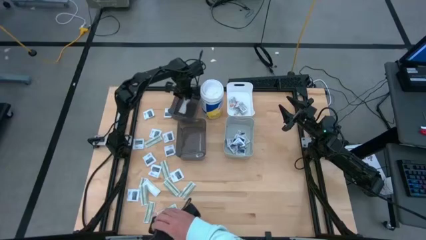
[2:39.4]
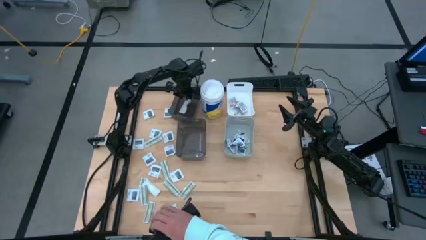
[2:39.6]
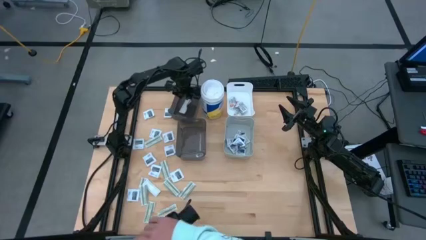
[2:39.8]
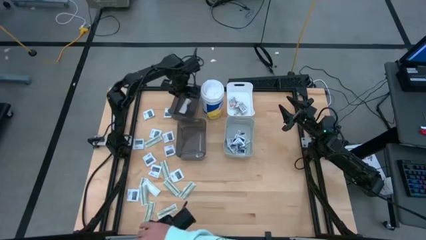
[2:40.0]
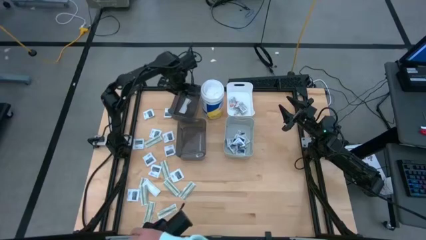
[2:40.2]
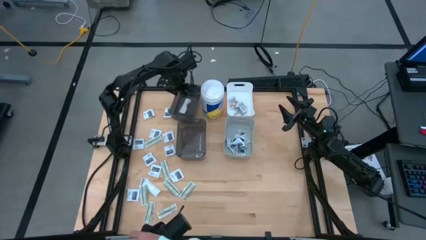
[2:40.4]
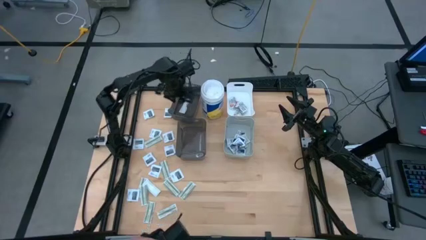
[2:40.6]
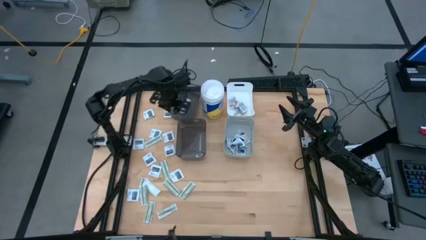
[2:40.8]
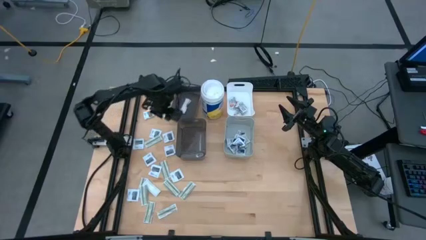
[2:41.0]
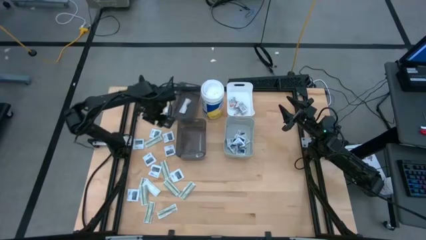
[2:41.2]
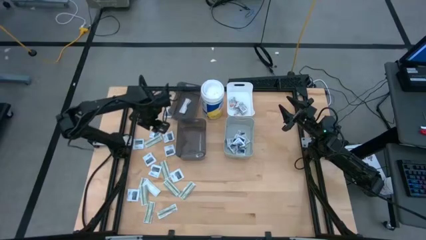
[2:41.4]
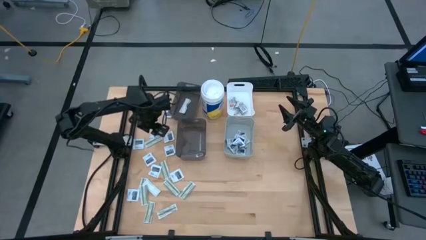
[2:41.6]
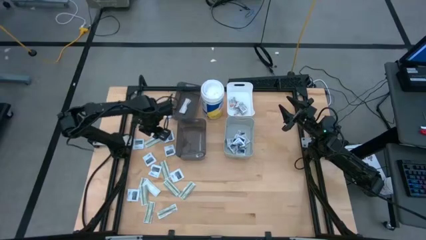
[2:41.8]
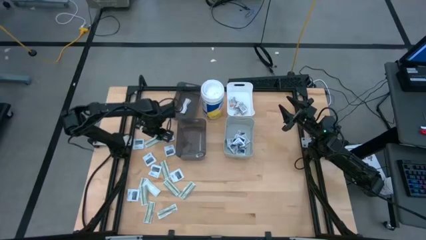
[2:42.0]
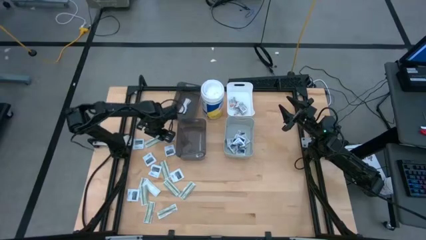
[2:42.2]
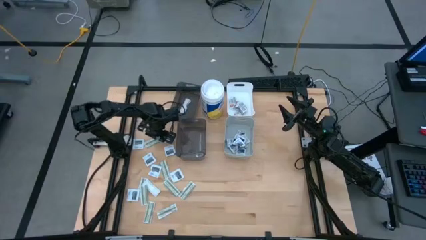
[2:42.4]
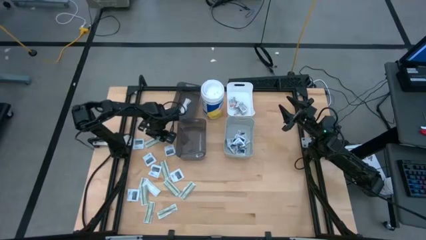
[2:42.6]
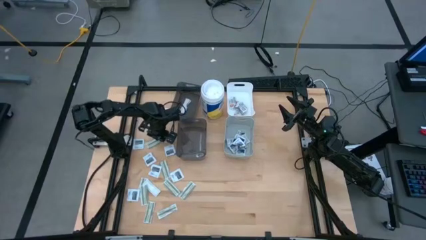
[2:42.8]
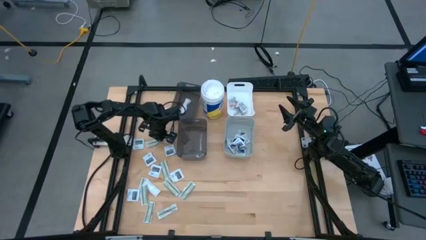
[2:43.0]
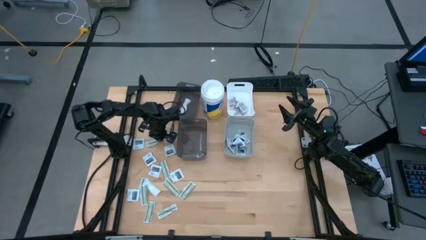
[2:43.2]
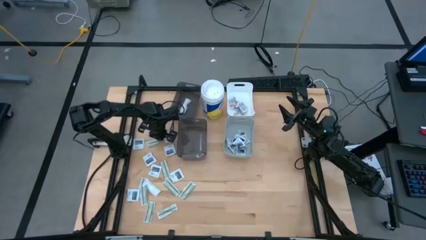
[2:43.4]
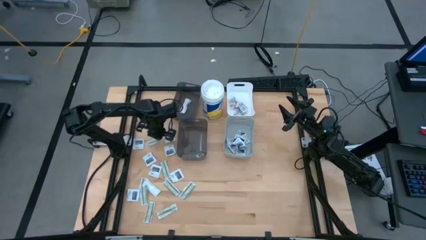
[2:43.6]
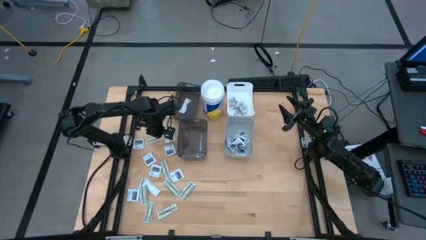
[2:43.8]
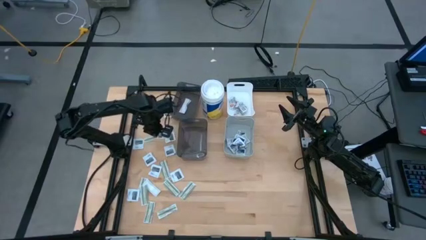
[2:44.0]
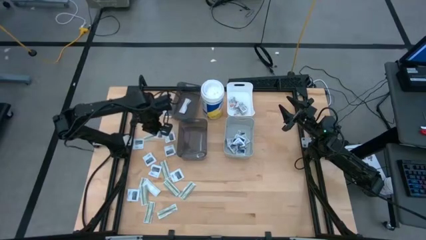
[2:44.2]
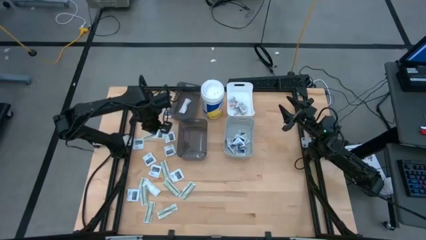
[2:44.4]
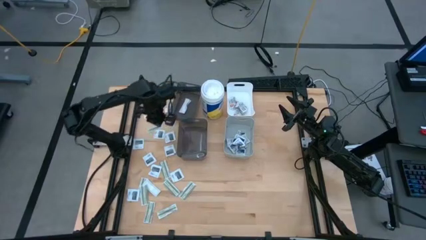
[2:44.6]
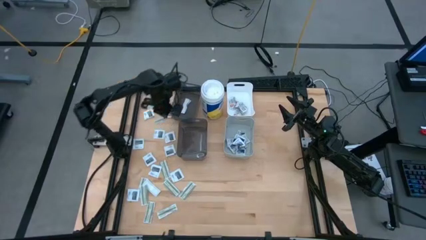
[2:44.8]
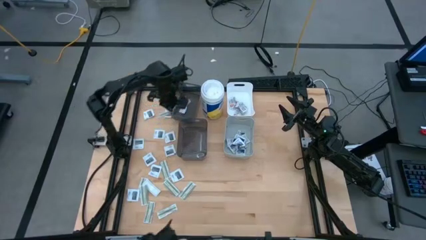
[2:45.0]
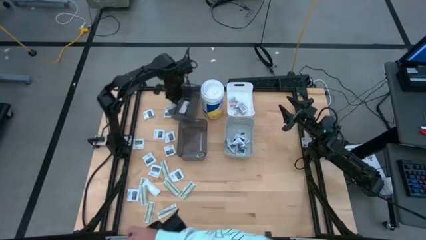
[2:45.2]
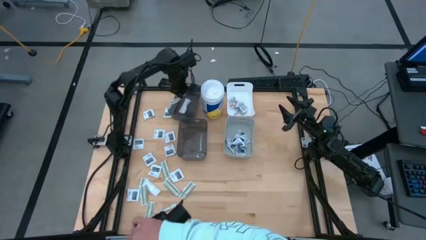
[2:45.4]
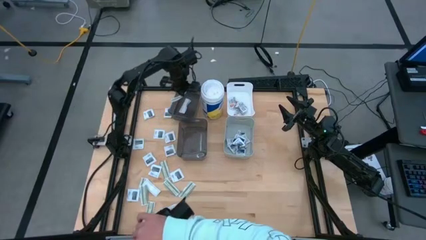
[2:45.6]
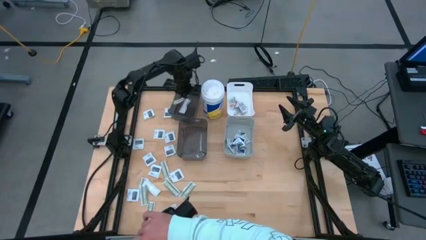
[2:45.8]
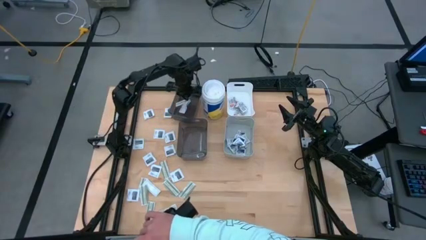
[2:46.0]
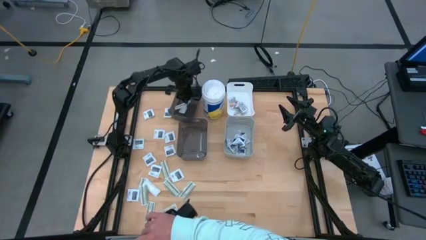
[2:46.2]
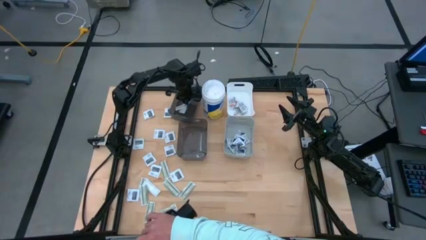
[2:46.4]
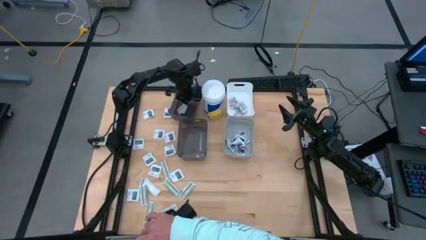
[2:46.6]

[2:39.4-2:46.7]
Task: Pick & Place First Aid Supplies
Put the bandage pack into the top black bin

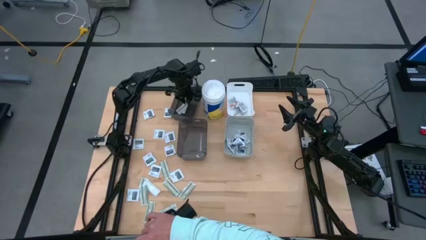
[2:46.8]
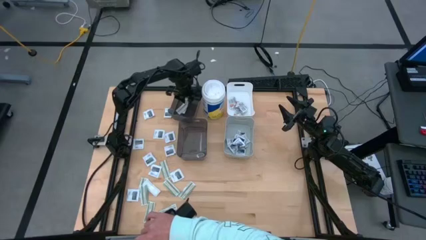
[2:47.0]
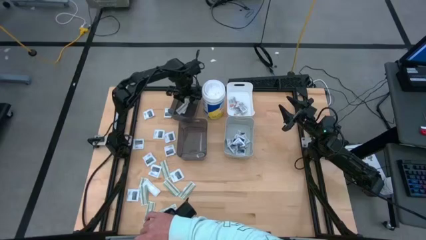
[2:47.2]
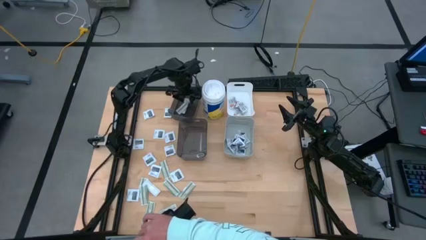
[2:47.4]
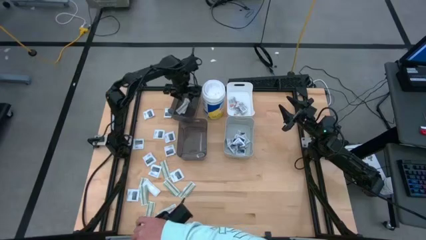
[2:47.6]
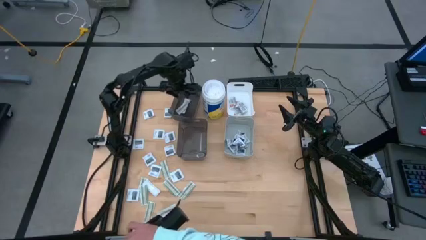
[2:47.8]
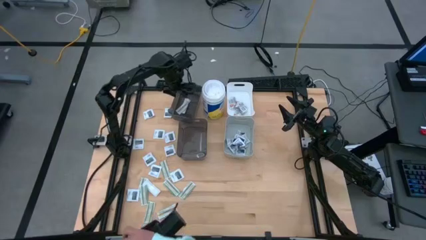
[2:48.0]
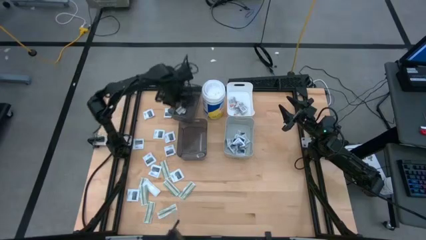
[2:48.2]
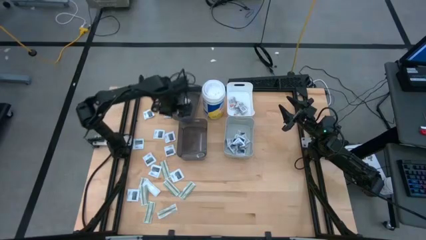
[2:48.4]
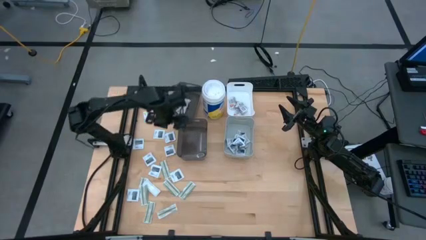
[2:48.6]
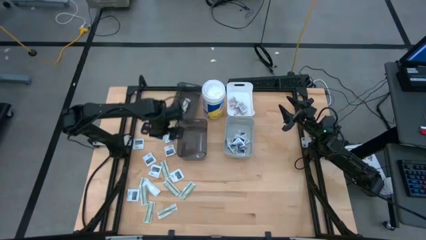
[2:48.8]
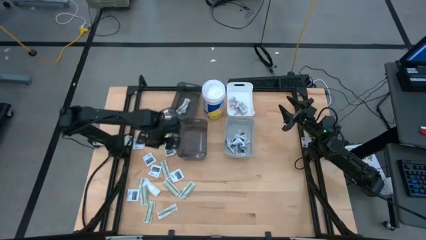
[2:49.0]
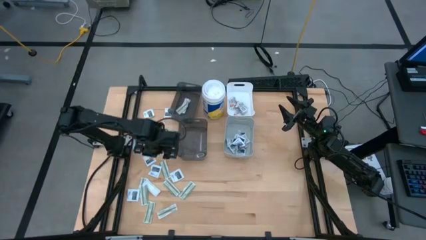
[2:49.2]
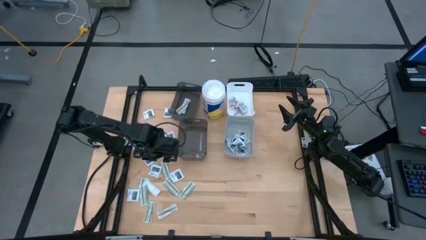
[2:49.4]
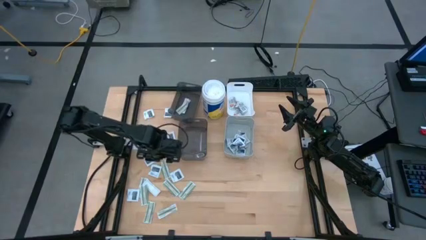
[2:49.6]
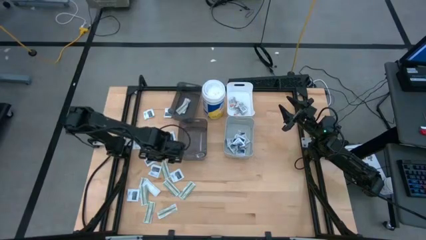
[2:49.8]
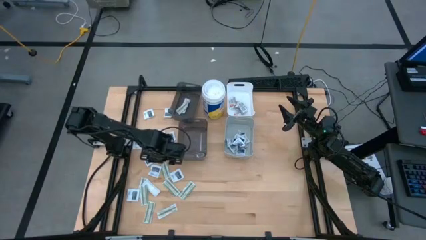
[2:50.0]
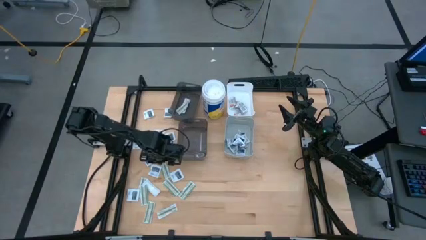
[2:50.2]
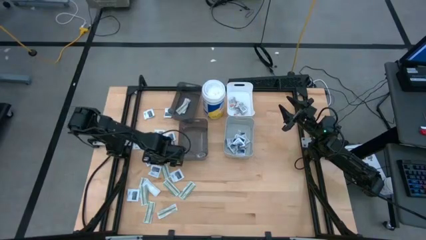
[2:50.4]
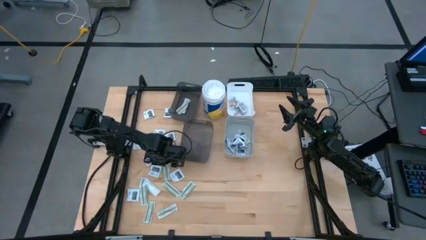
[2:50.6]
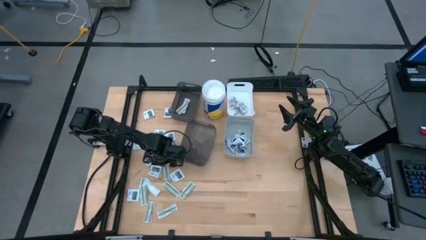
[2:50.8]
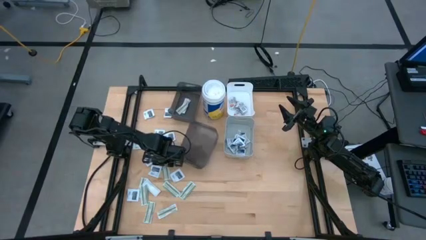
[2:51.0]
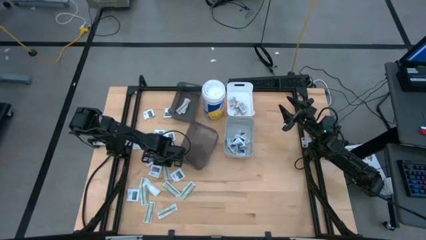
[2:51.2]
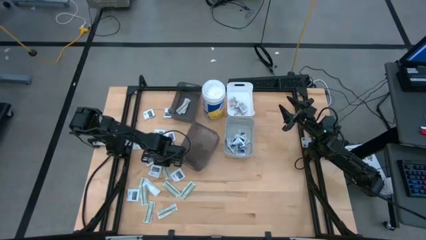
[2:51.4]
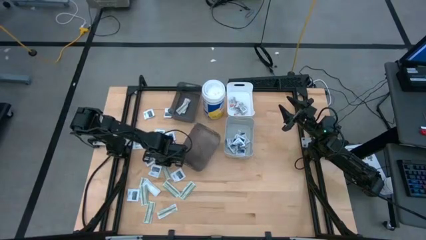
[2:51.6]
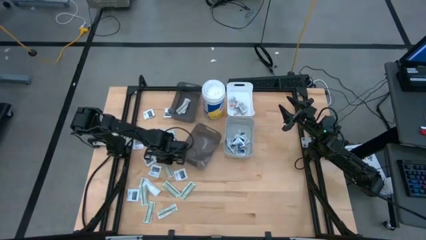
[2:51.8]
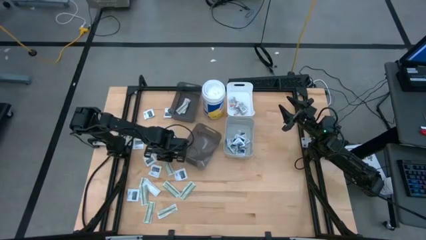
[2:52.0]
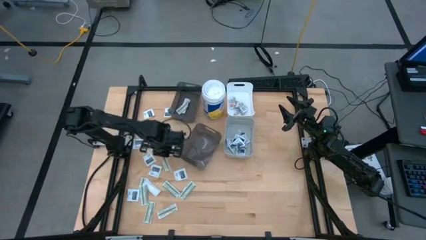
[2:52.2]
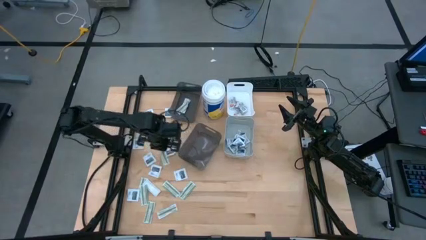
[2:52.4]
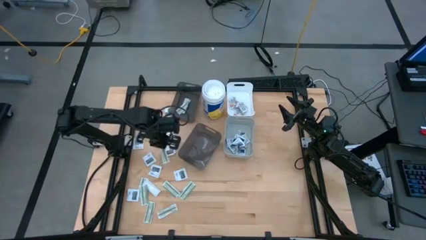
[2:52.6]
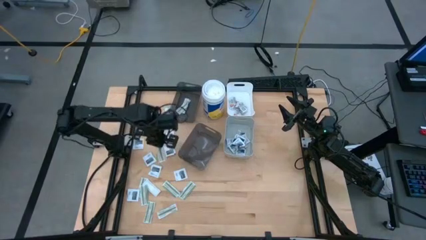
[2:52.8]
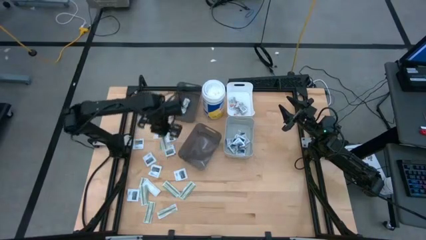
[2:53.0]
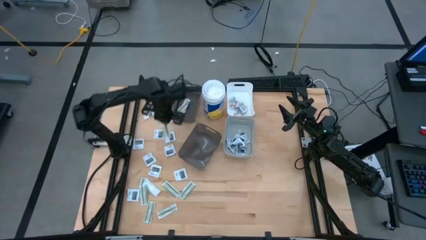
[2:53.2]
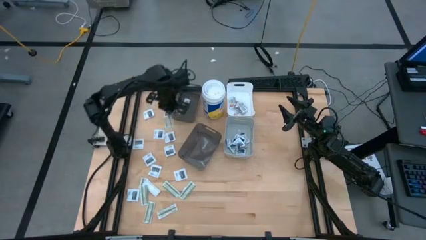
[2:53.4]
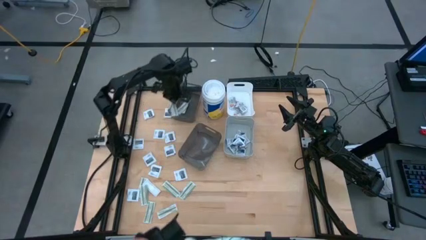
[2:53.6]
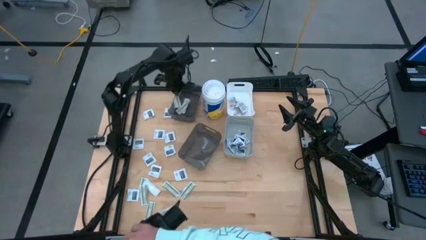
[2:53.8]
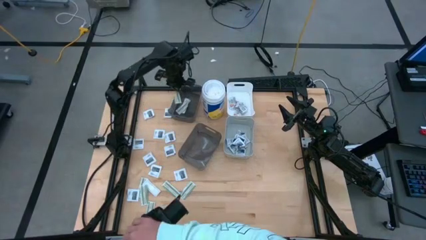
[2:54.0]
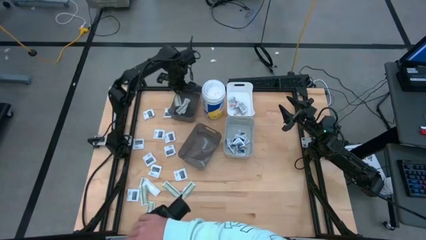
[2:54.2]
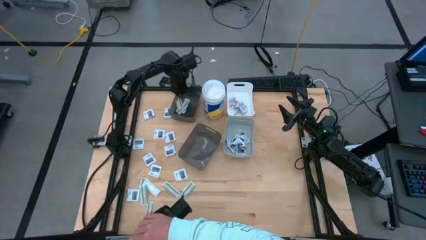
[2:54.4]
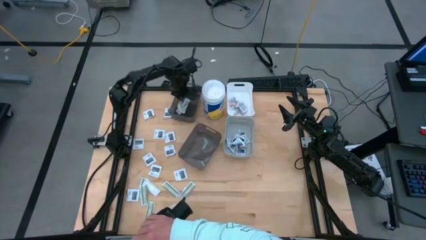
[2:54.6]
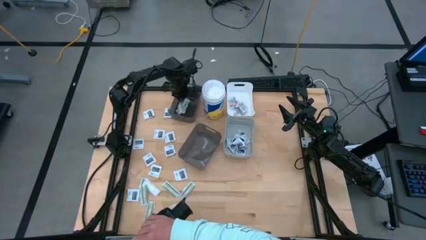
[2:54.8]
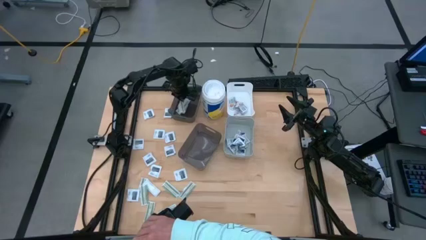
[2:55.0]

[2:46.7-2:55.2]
Put the bandage pack into the top black bin
